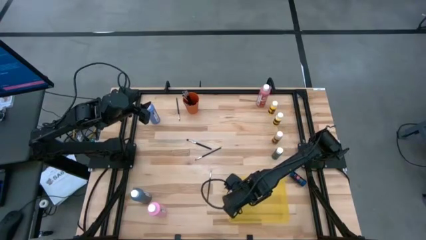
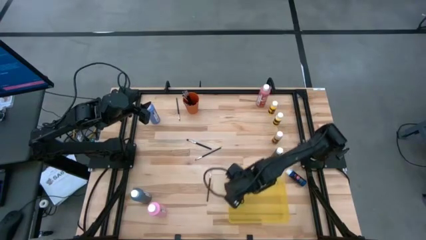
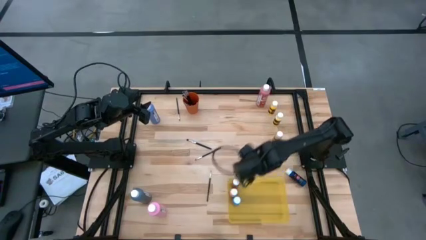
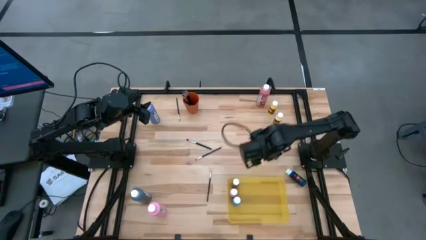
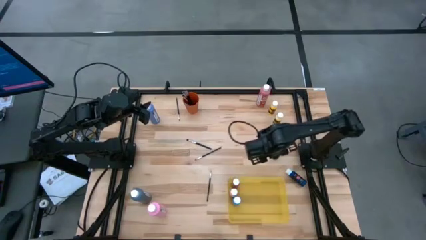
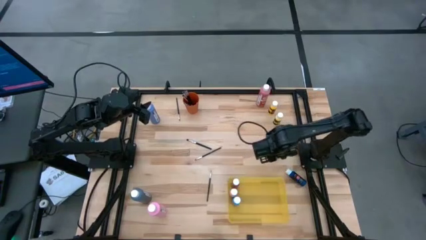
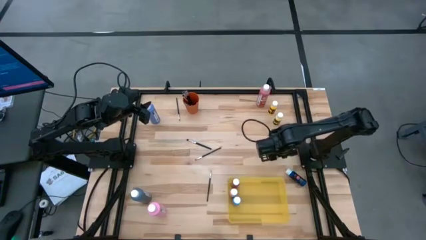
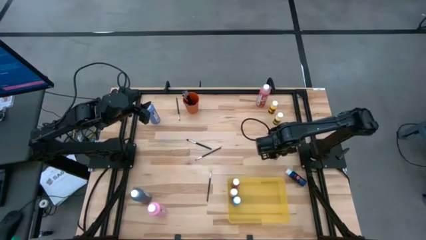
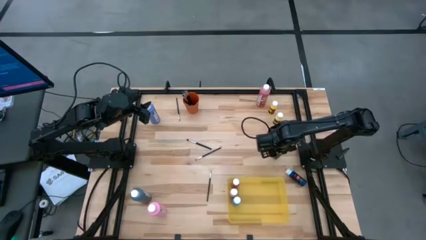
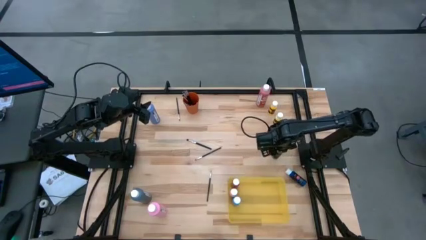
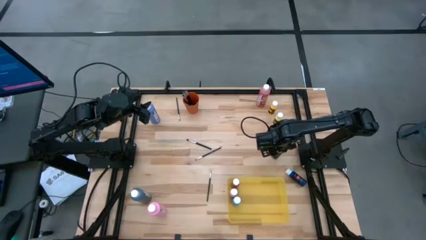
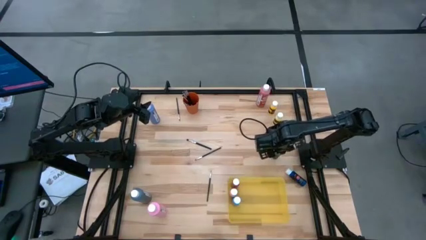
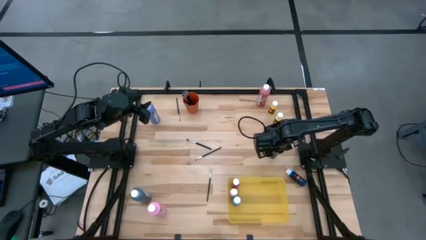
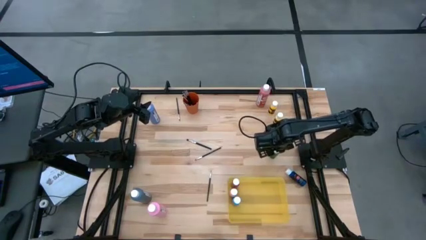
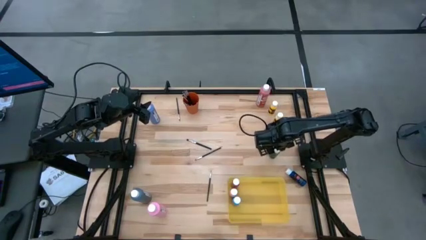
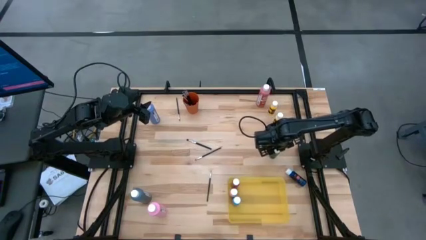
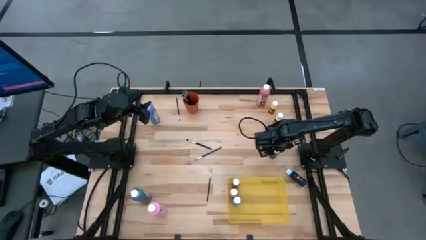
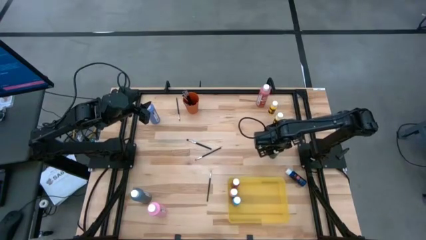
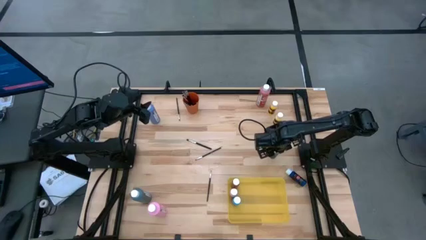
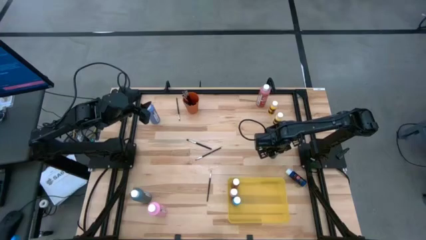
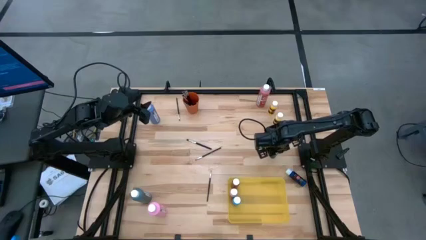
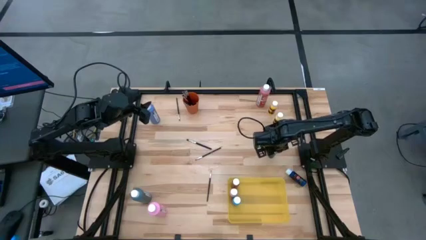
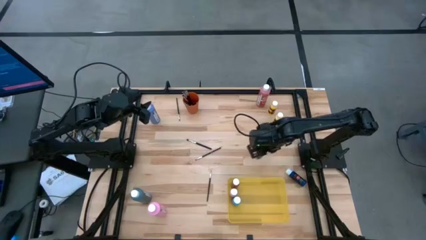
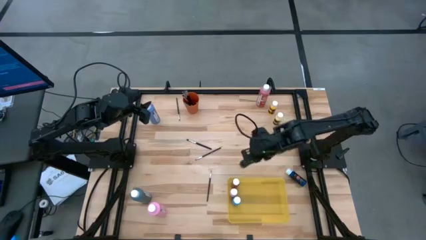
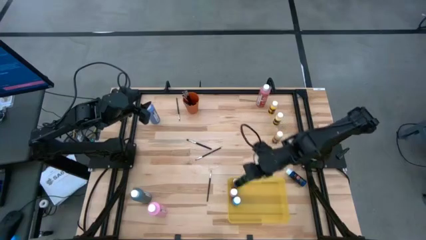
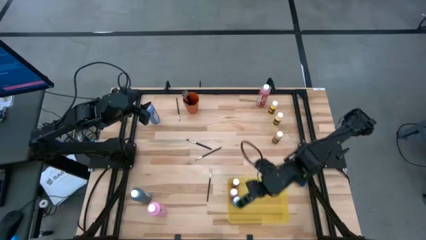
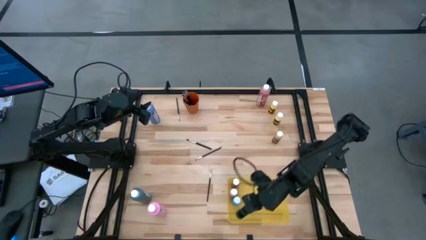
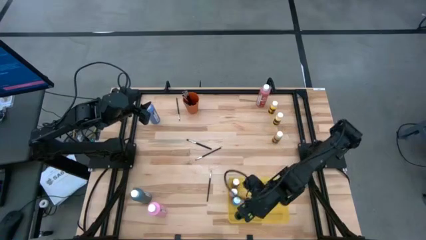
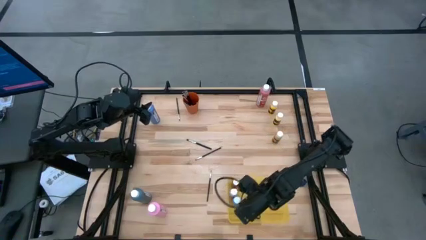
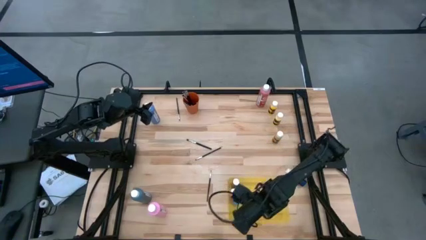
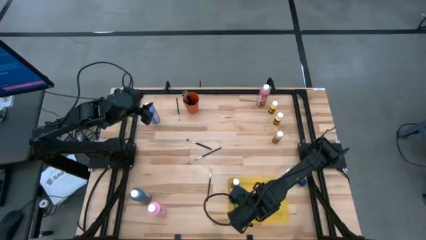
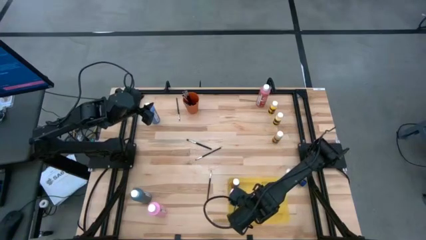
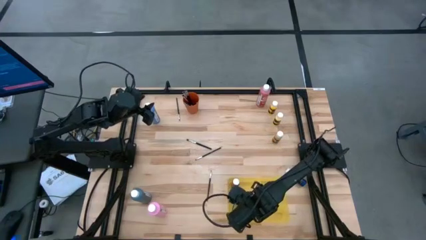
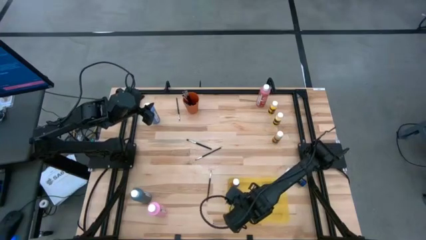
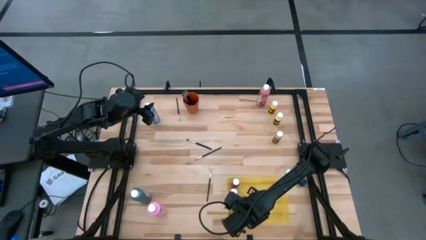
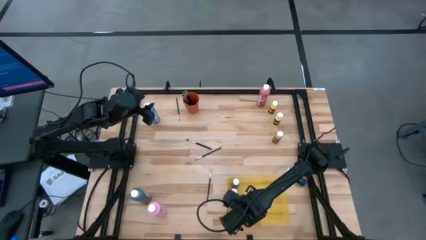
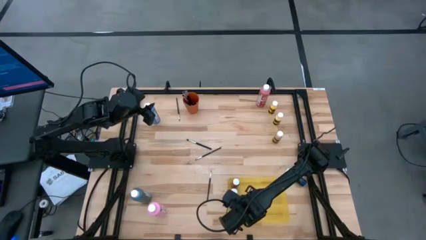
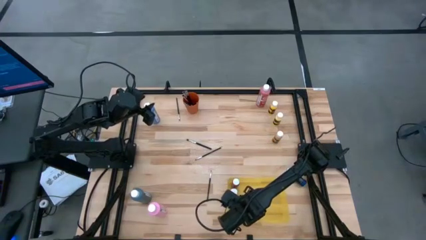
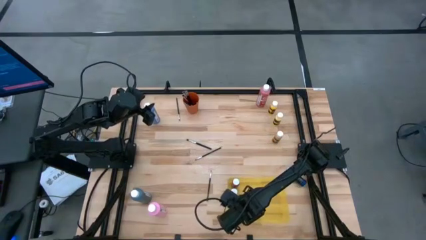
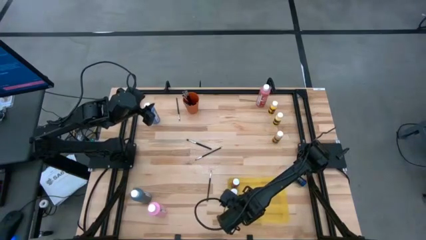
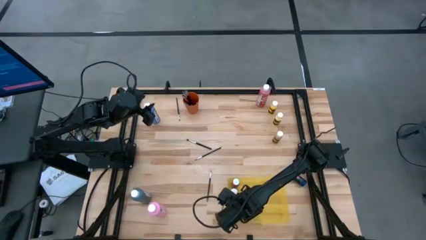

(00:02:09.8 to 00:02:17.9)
Task: Pick & Place Paint Supplies
Put the green paint bottle into the yellow bin

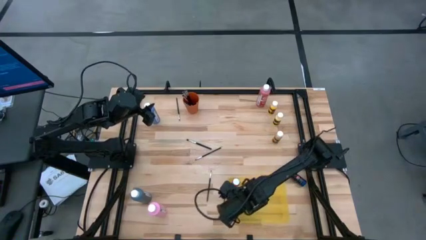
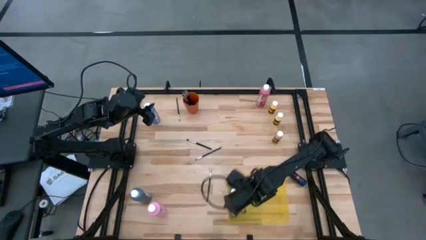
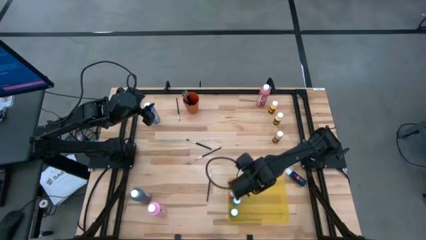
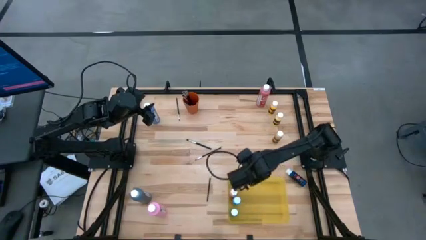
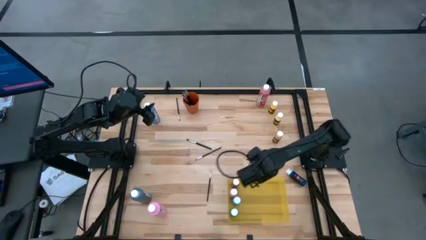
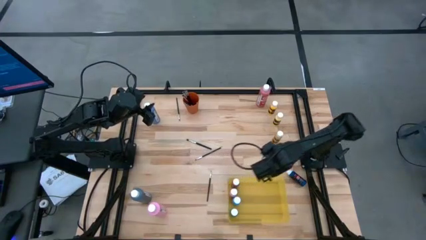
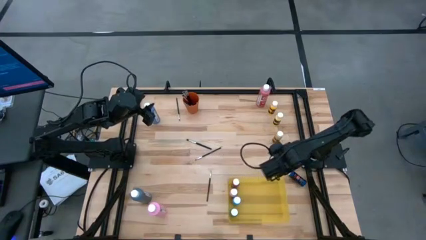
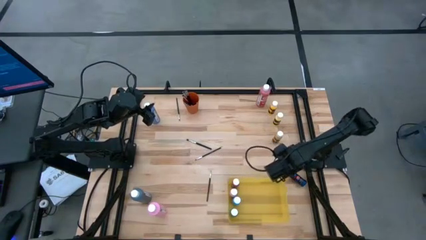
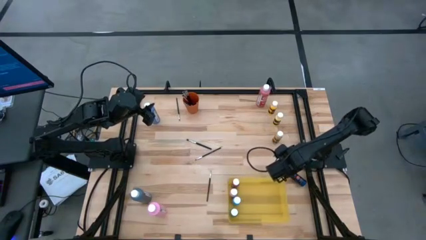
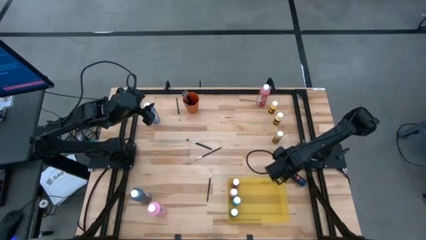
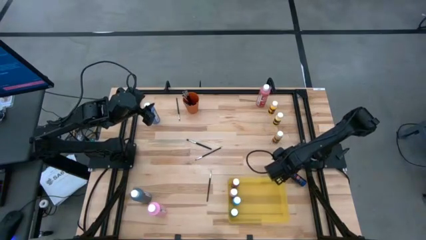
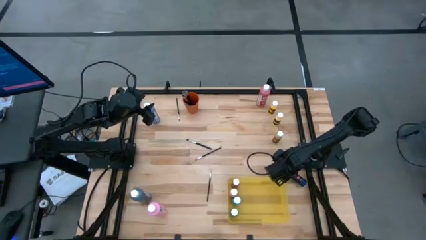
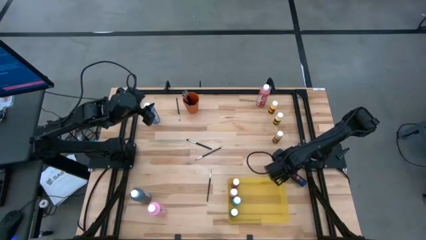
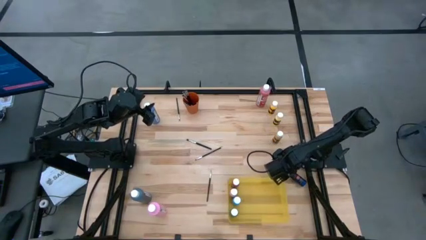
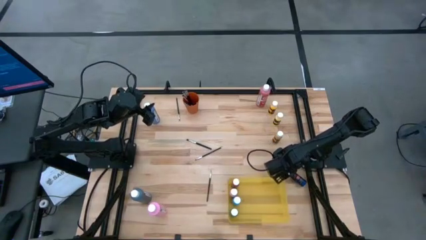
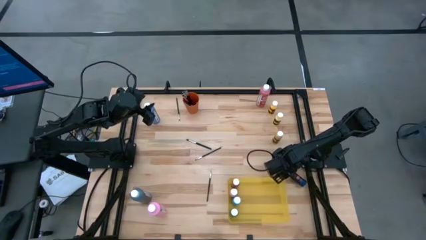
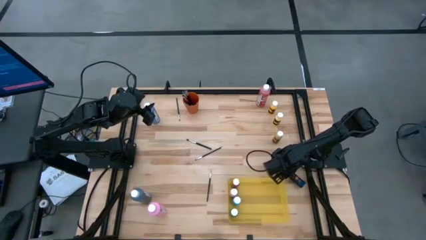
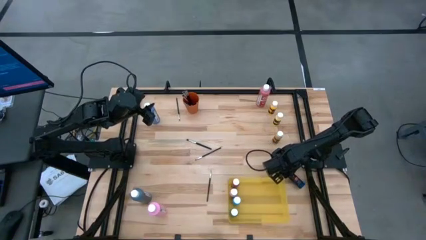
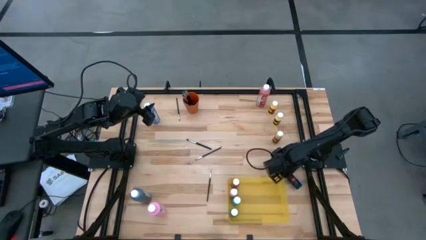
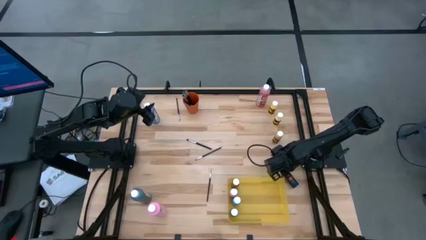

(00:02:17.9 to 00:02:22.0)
Put the blue paint bottle into the yellow bin

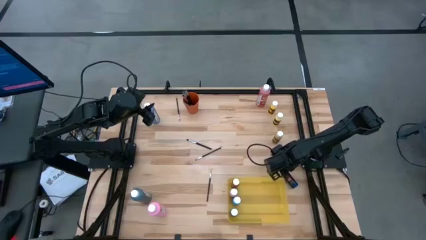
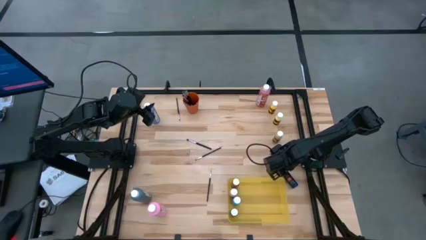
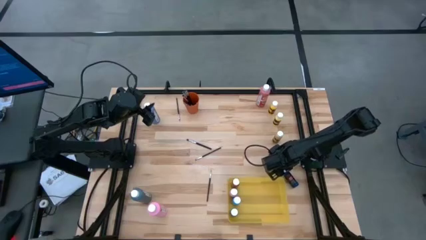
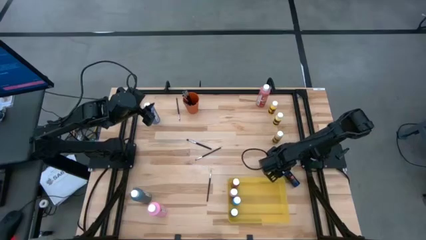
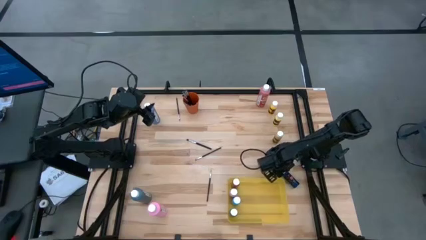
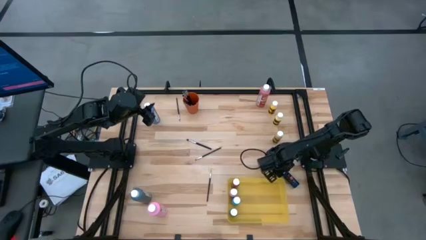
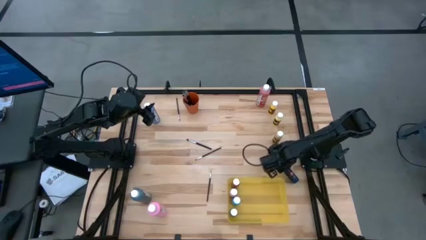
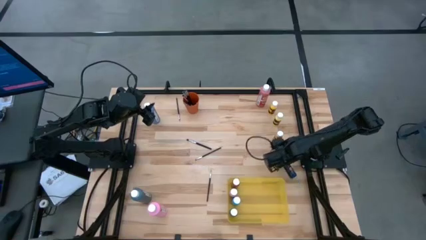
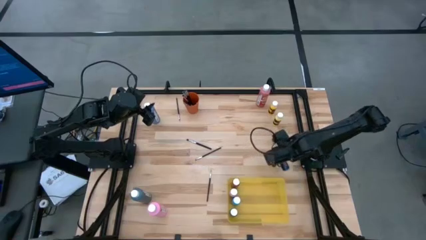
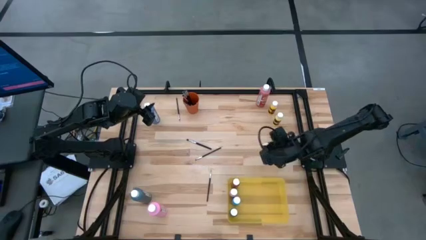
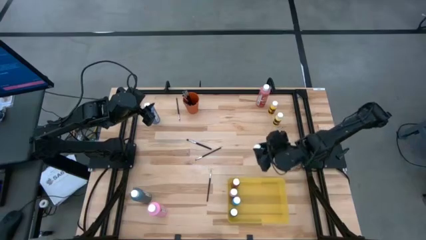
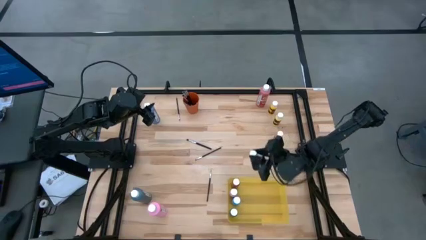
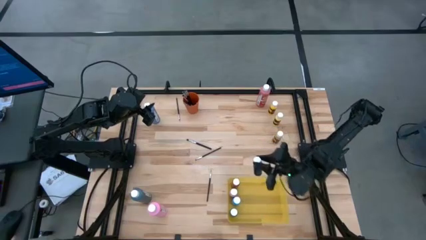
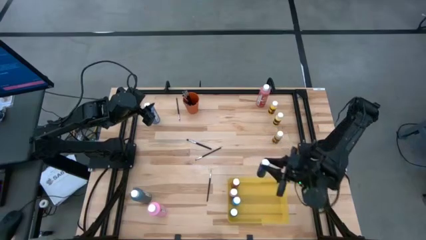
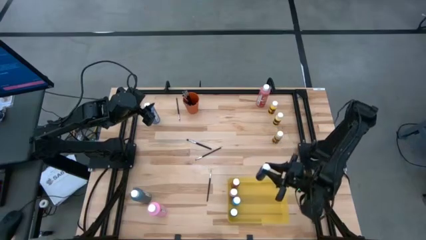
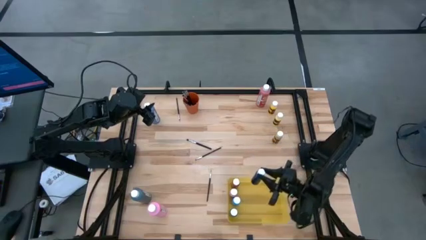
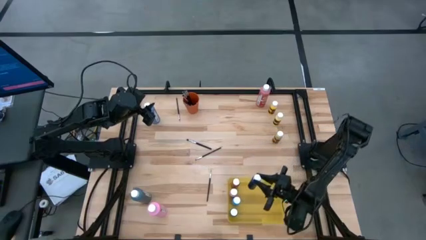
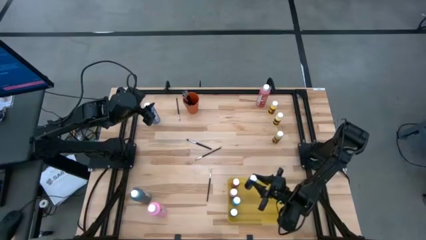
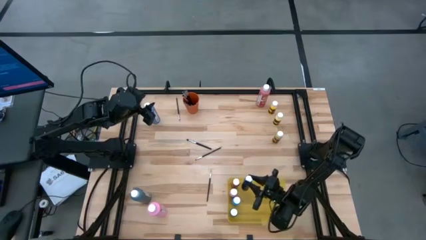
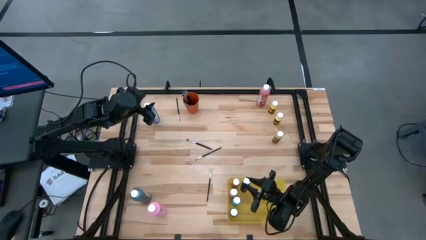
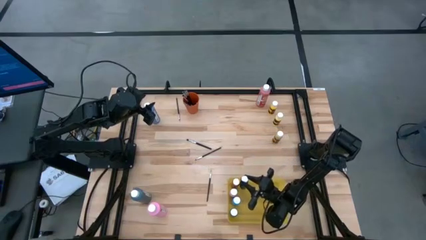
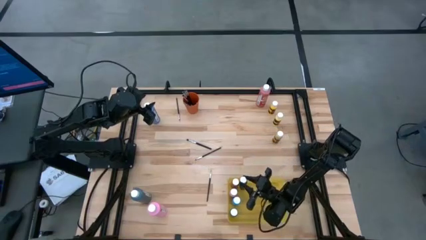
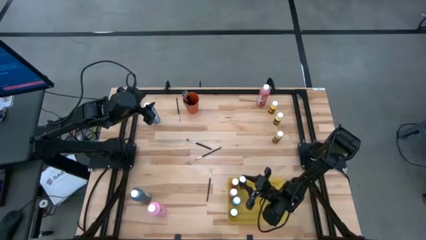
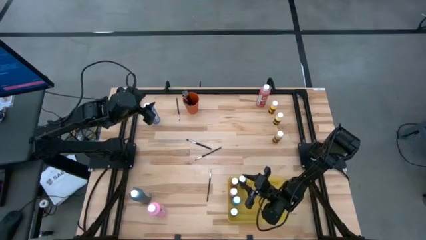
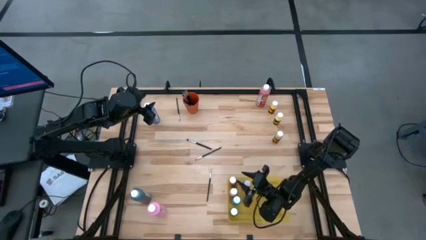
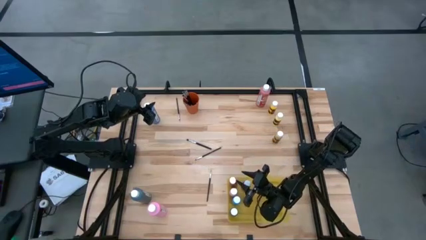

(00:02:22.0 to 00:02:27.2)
Put the blue paint bottle into the yellow bin
